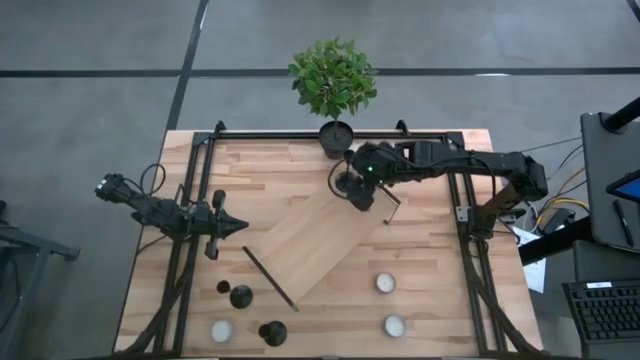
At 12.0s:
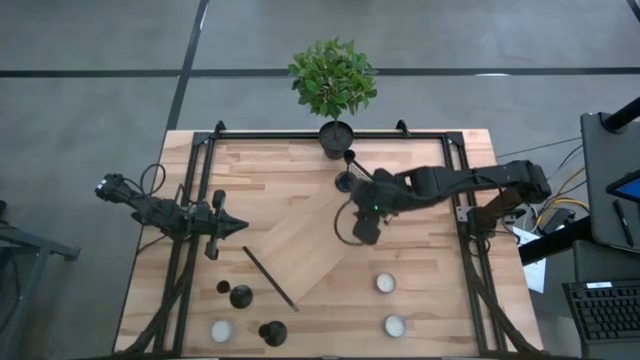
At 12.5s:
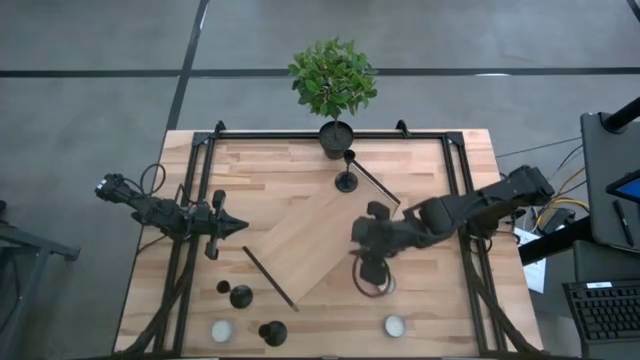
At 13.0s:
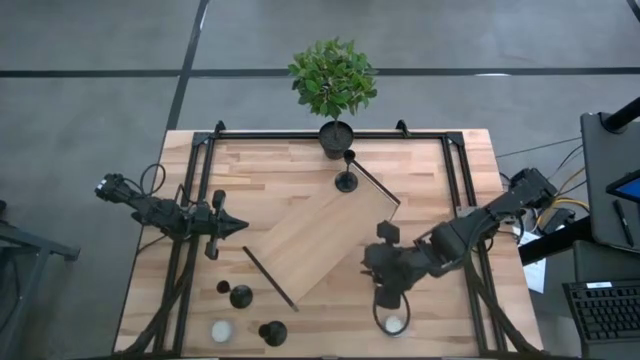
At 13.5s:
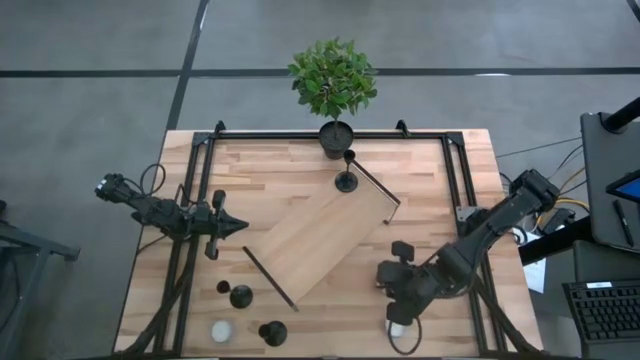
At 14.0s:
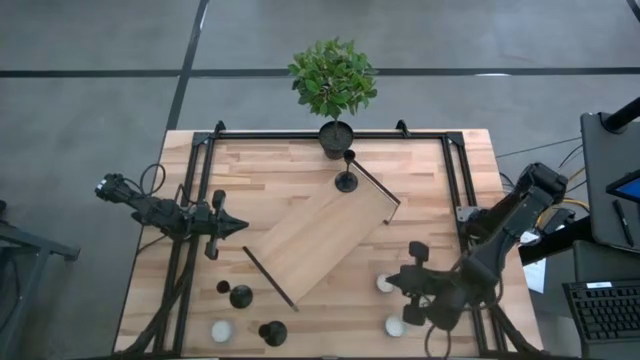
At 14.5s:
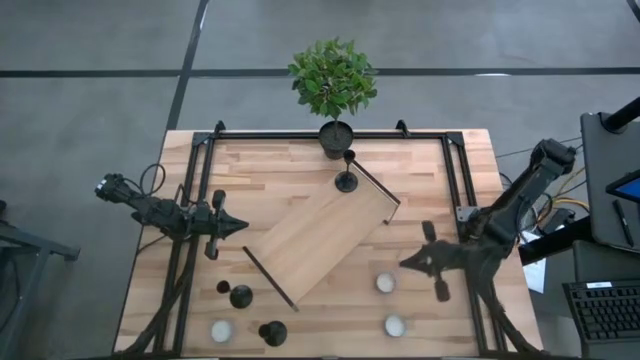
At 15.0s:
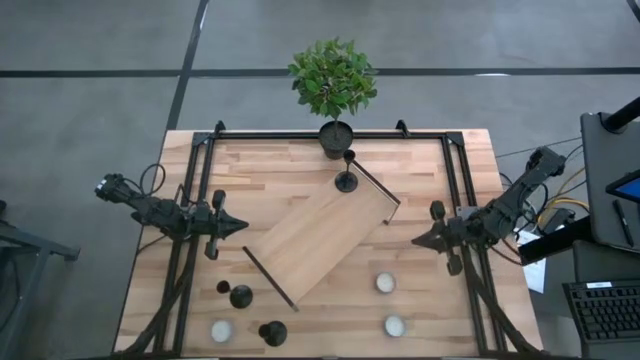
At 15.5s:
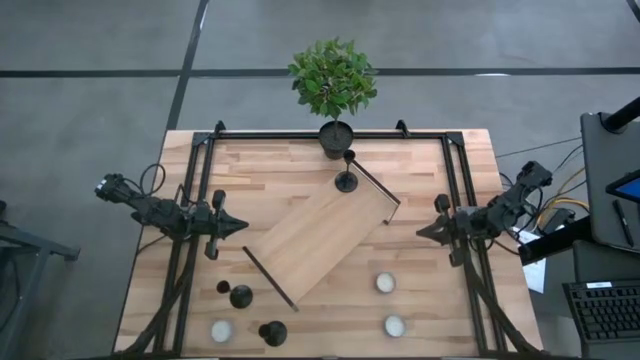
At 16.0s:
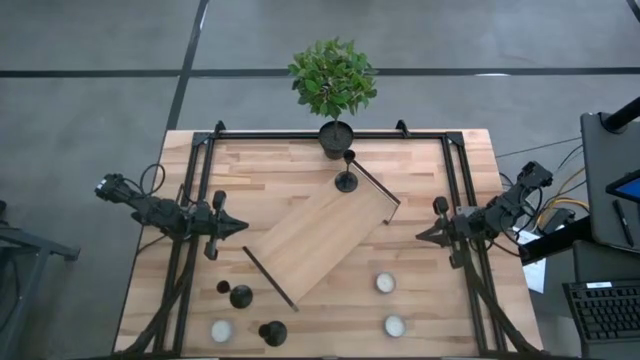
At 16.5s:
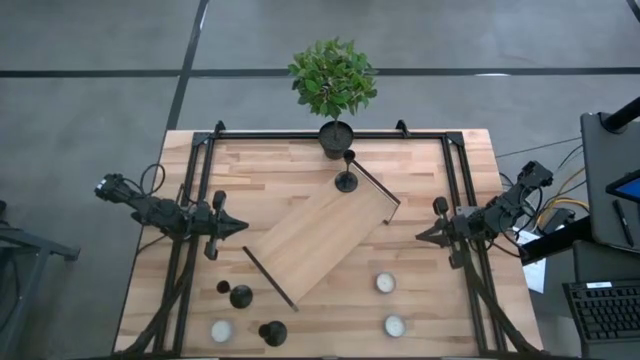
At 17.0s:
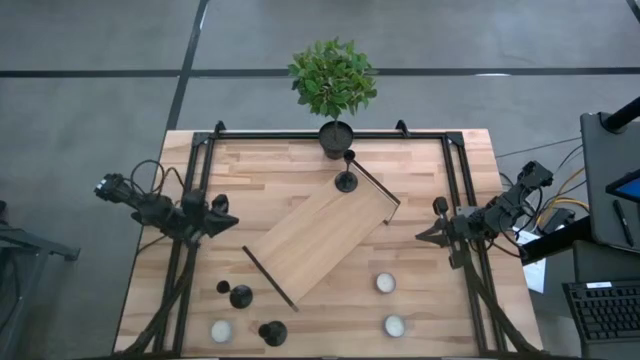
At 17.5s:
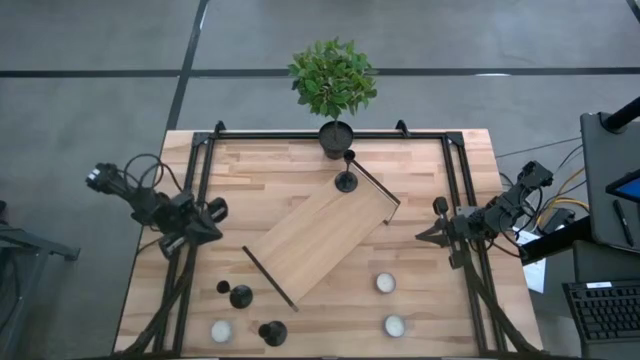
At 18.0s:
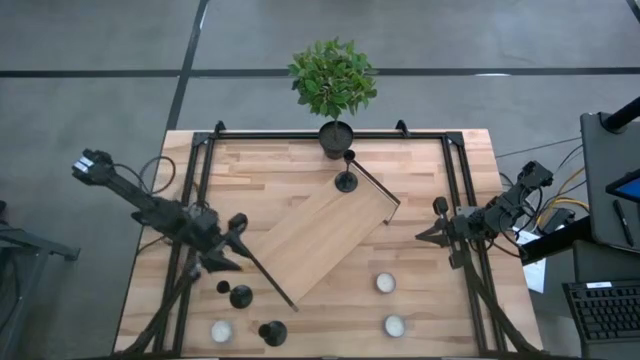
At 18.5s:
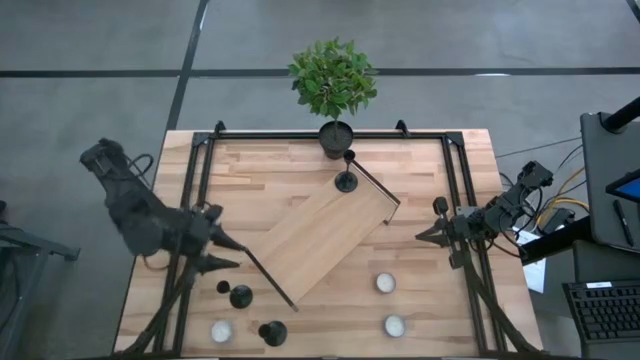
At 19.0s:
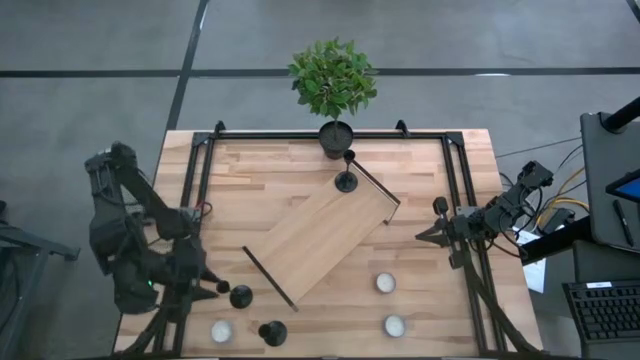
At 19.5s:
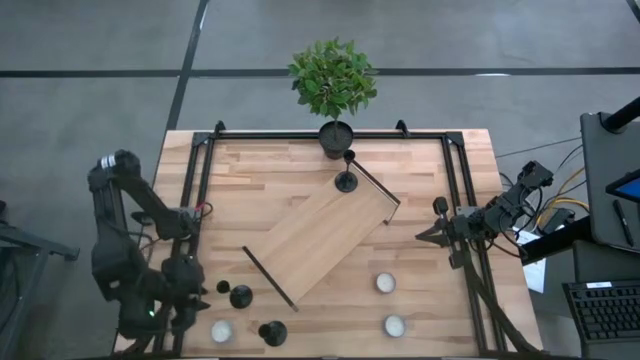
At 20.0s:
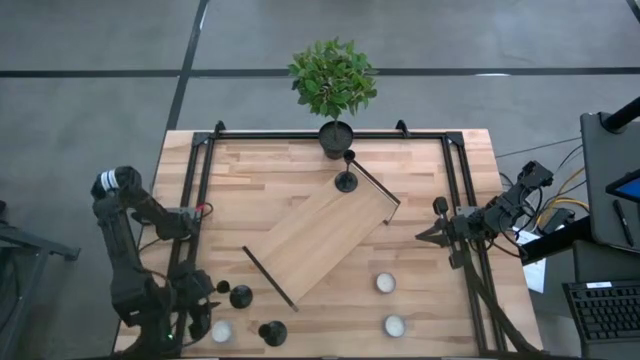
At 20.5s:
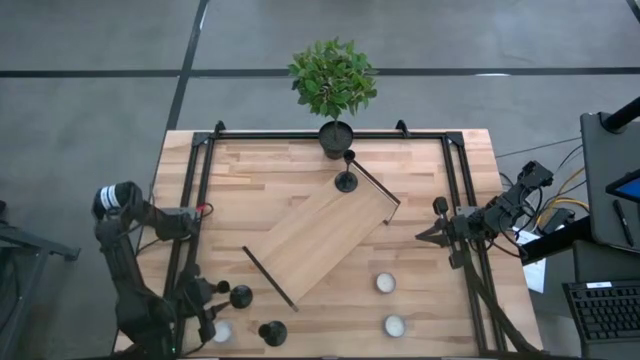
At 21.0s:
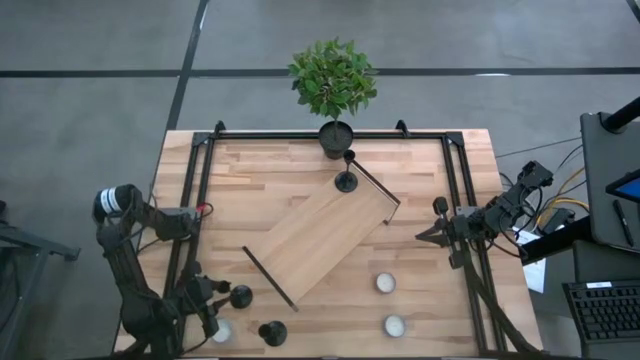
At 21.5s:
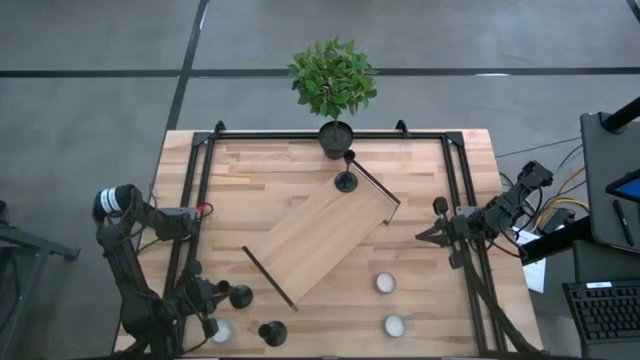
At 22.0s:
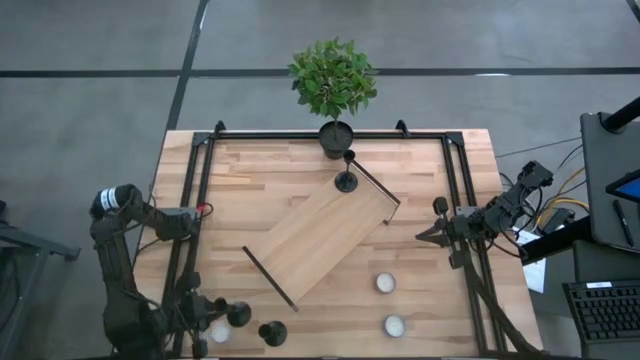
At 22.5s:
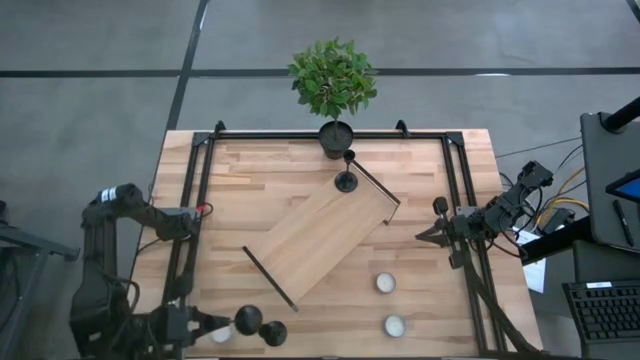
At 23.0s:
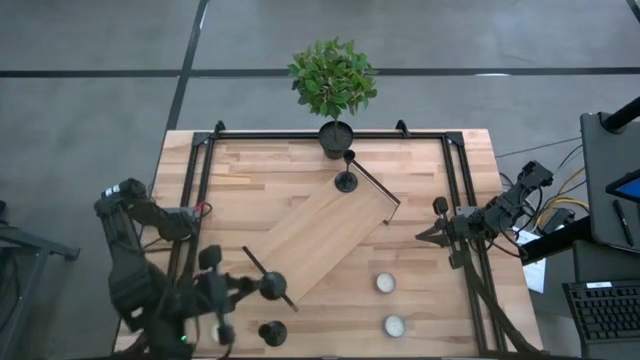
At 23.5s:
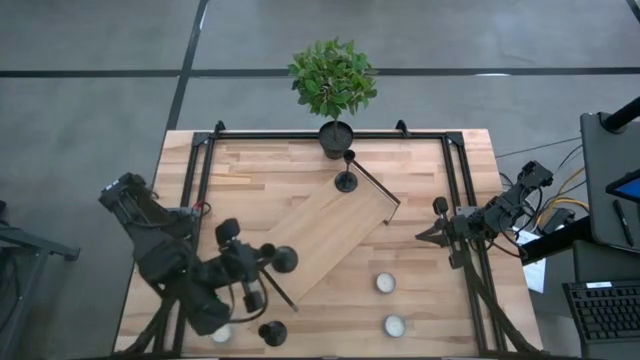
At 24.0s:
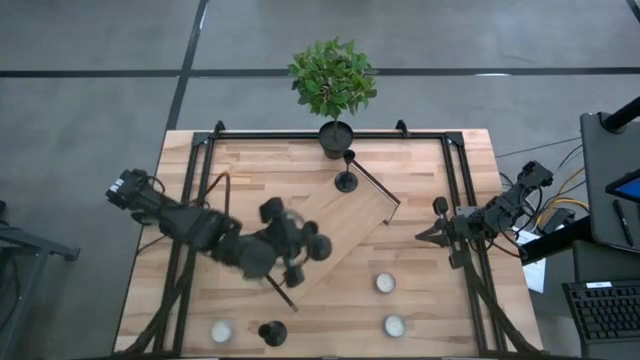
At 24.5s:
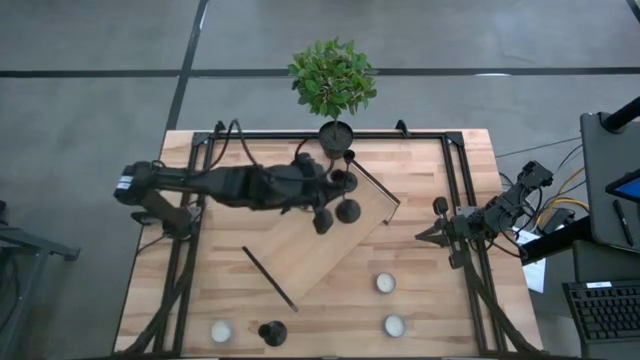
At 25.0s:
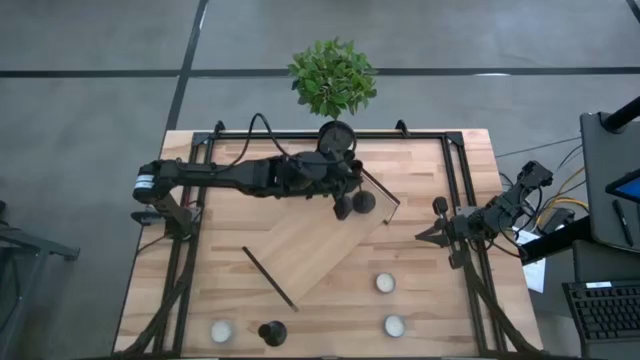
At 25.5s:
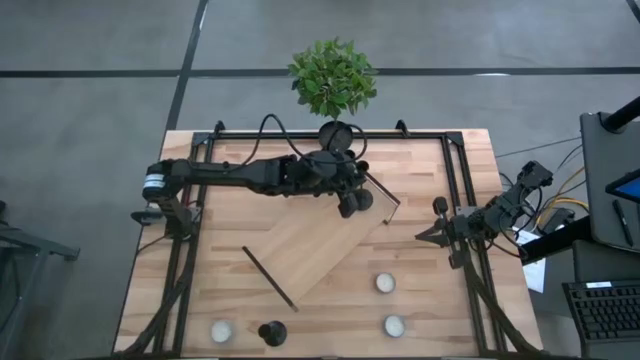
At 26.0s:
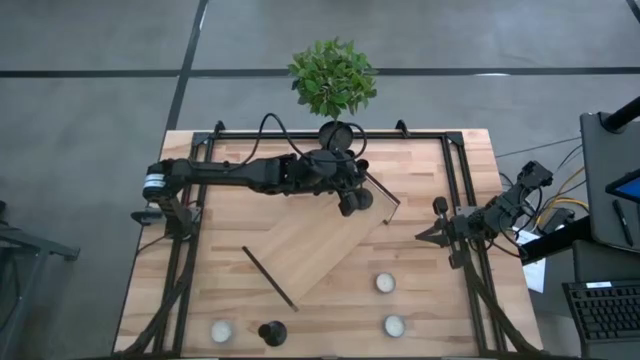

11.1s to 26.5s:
Task: Pick & Place candle stick holders
Put the top black candle holder on the shelf aligned with the other candle holder

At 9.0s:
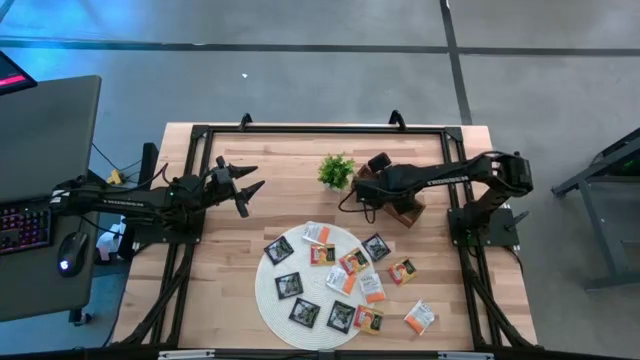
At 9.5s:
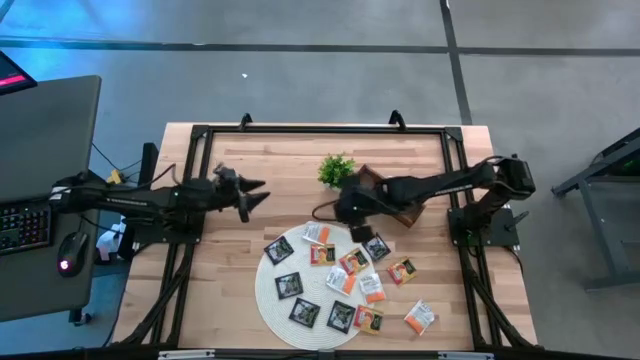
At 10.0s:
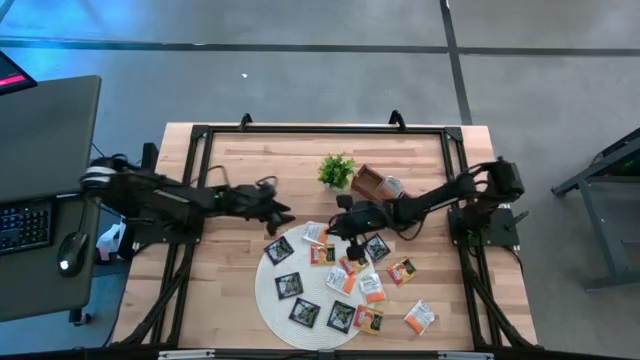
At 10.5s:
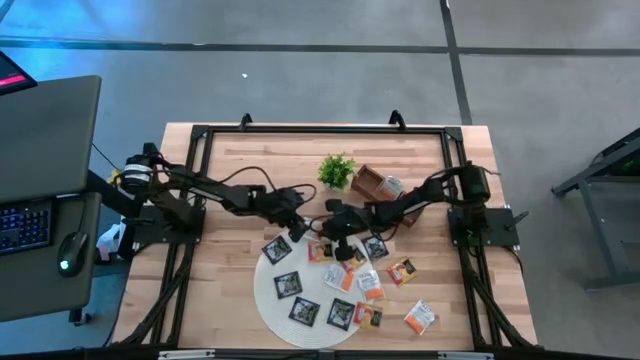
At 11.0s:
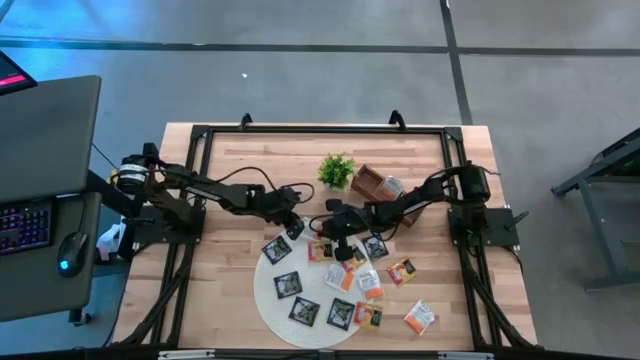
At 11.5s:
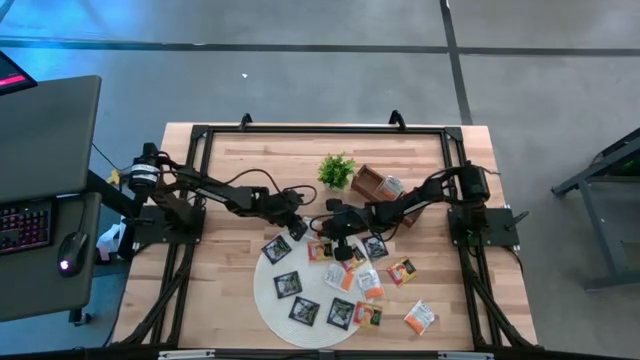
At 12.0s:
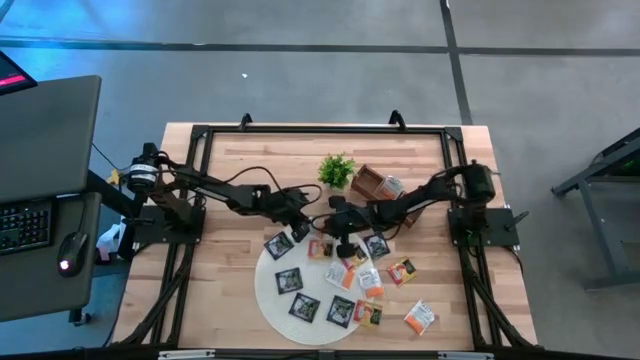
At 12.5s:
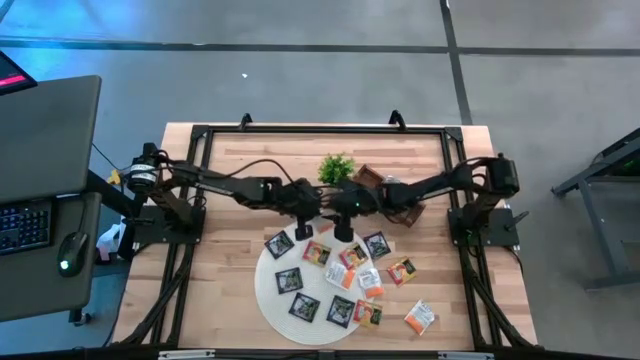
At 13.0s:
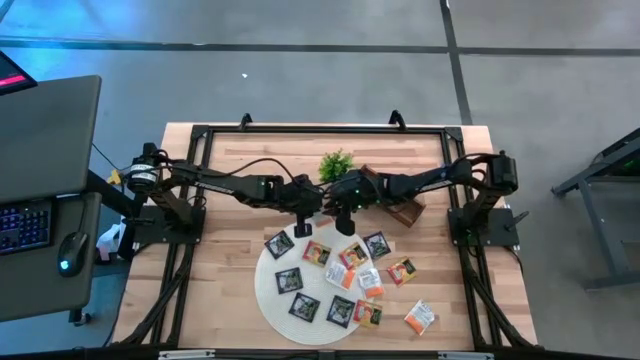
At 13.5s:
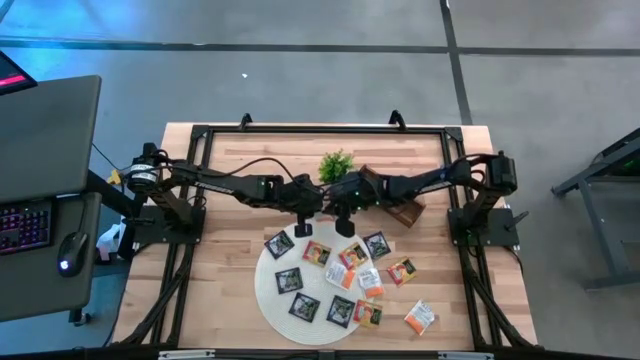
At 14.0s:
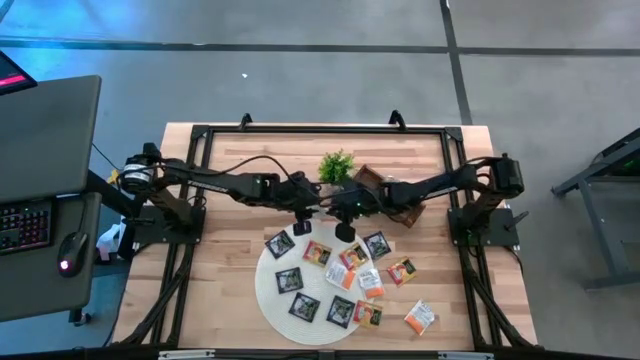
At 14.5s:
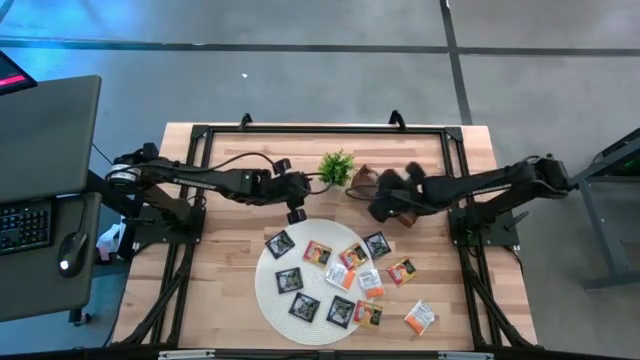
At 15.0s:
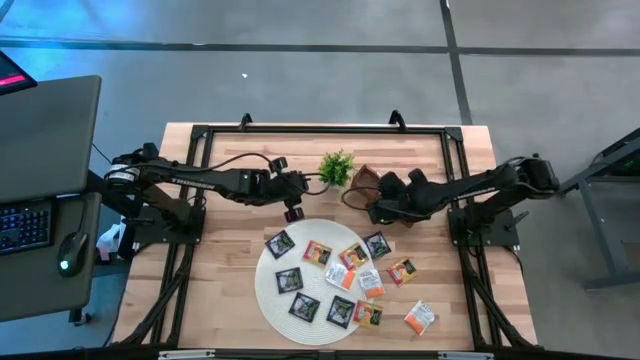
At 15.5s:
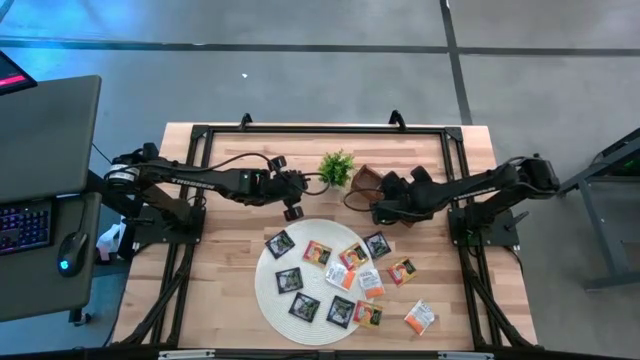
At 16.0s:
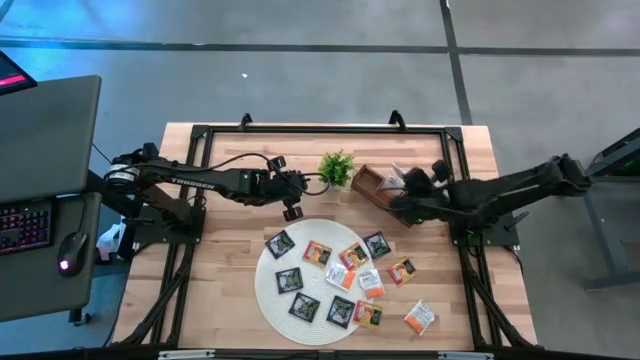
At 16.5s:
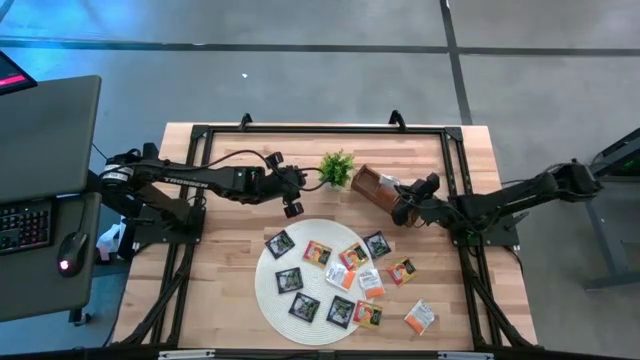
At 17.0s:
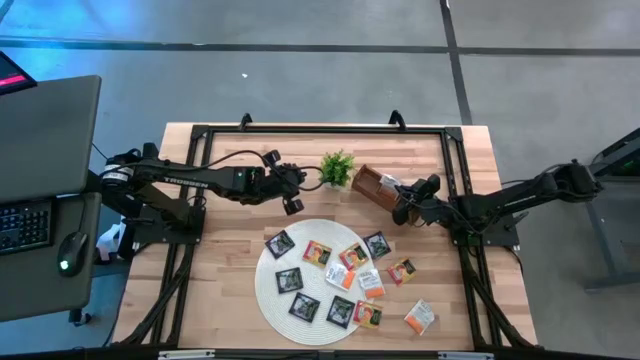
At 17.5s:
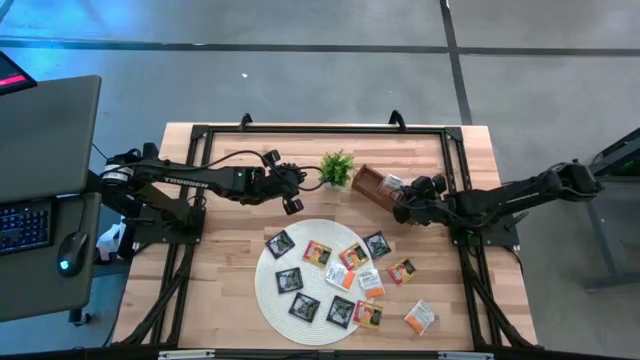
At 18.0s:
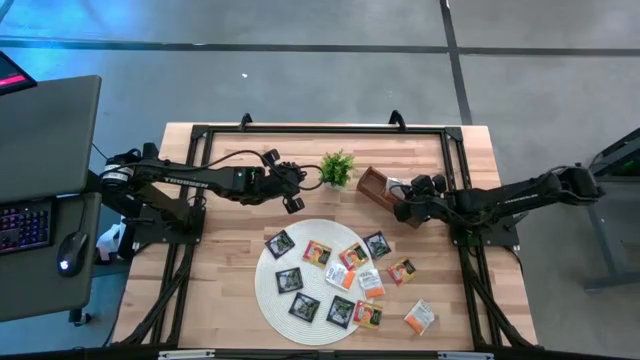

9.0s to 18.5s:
Task: Pick & Place Tea
Put the white tea bag into the middle section of the wooden organizer
